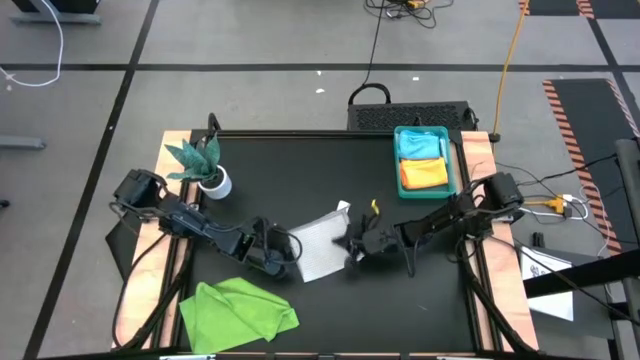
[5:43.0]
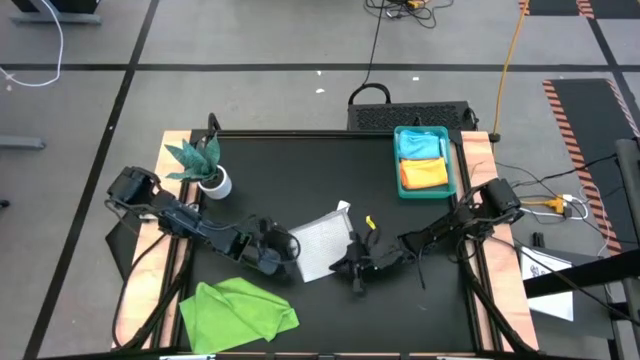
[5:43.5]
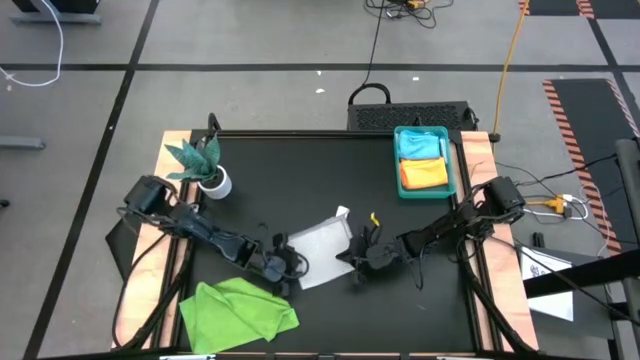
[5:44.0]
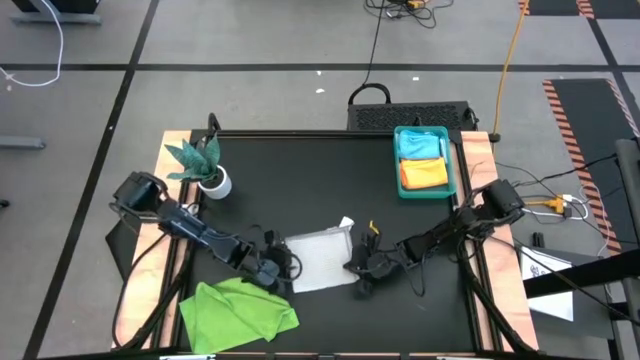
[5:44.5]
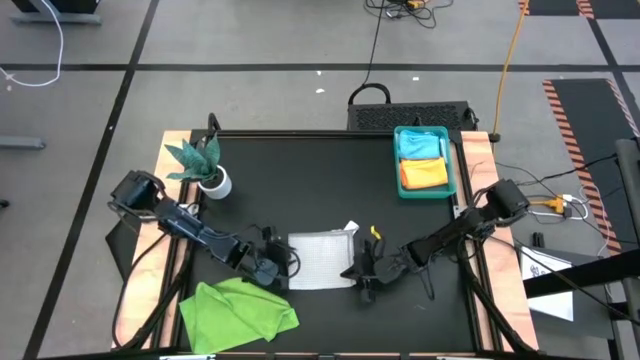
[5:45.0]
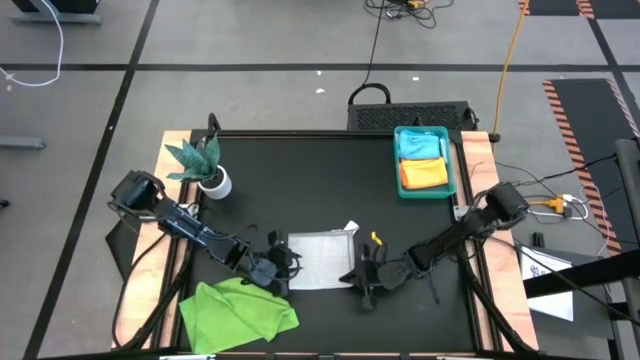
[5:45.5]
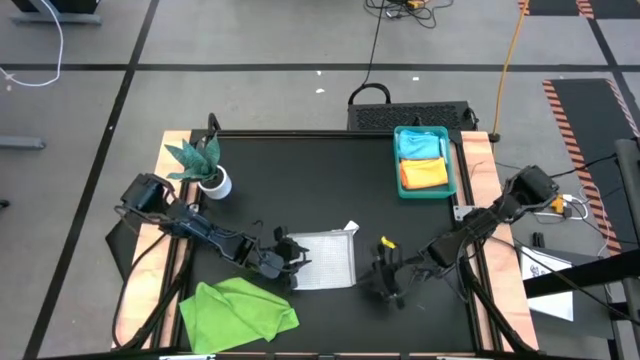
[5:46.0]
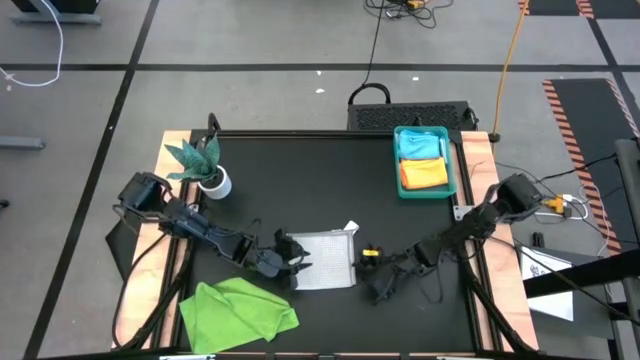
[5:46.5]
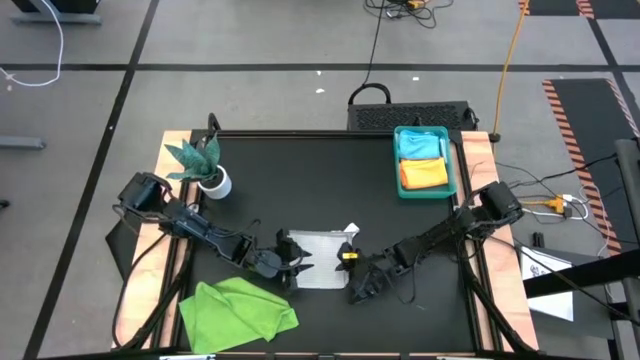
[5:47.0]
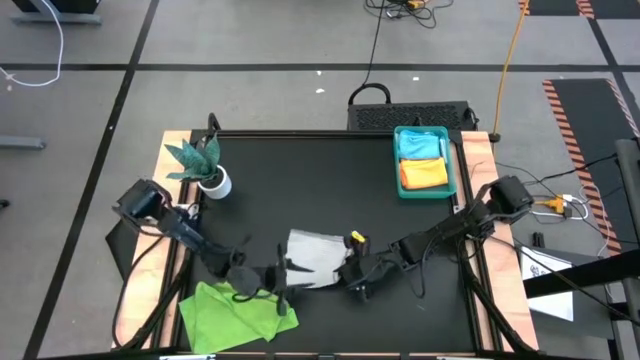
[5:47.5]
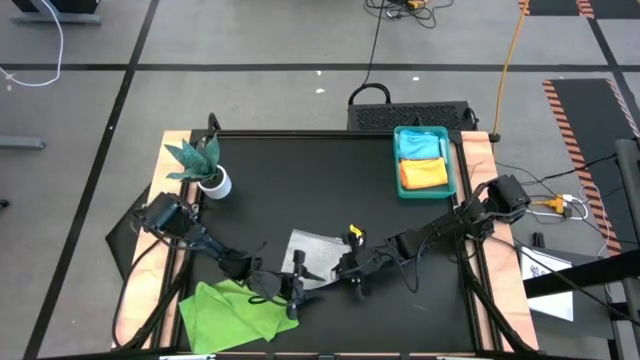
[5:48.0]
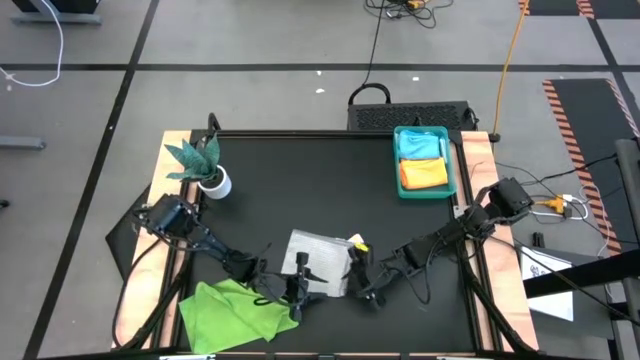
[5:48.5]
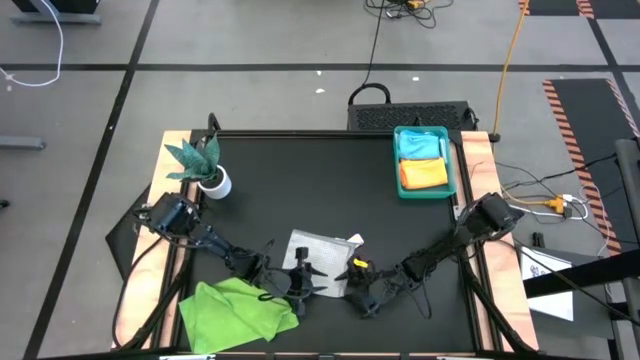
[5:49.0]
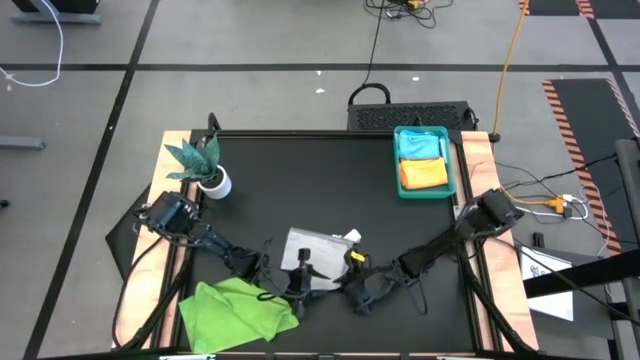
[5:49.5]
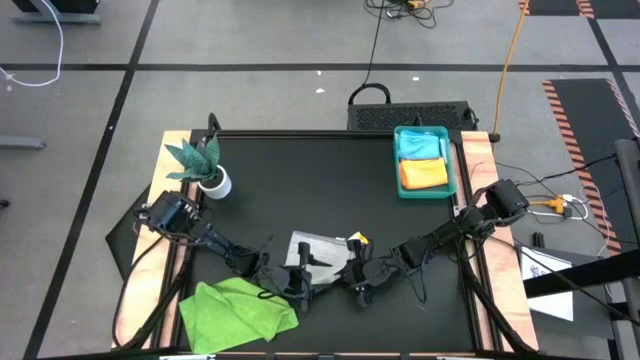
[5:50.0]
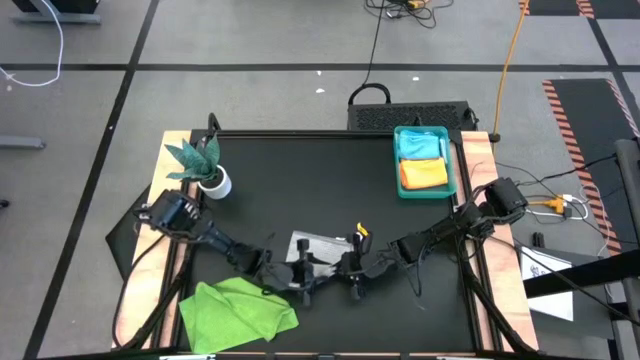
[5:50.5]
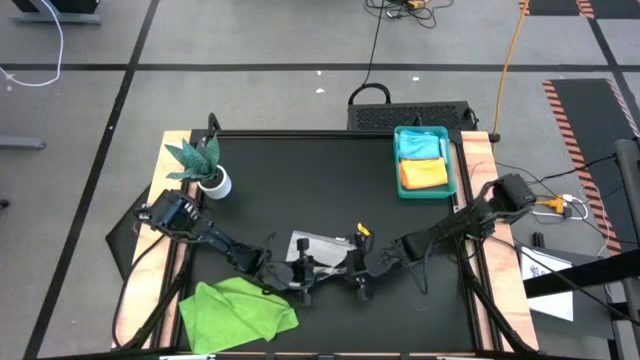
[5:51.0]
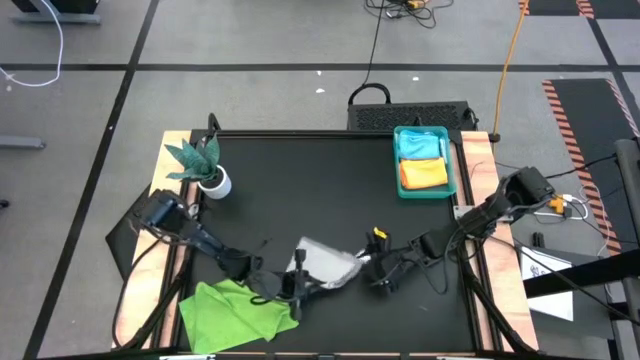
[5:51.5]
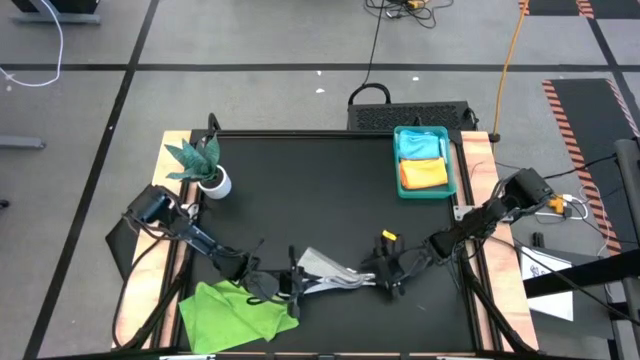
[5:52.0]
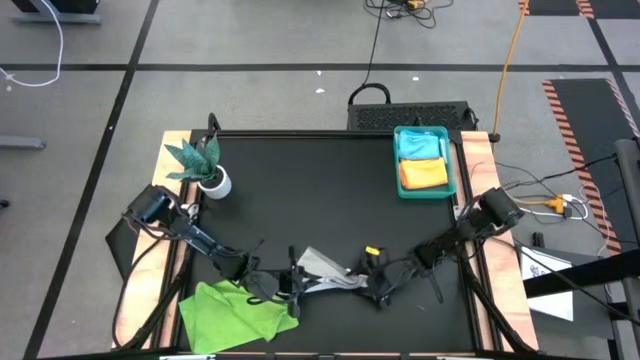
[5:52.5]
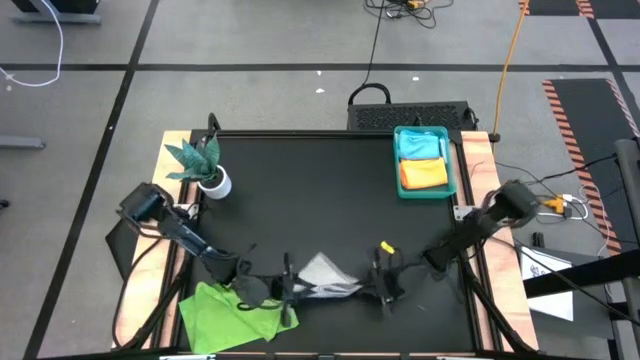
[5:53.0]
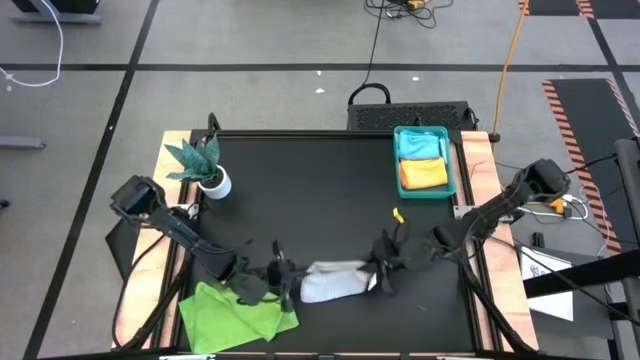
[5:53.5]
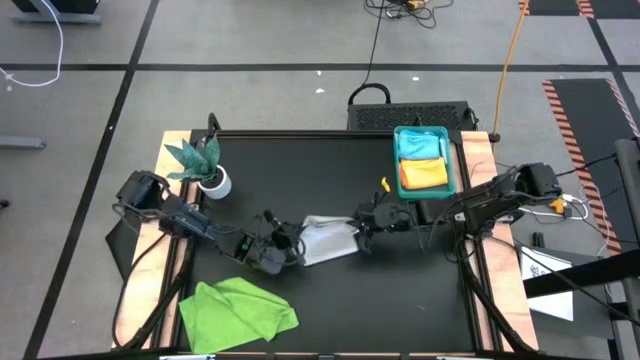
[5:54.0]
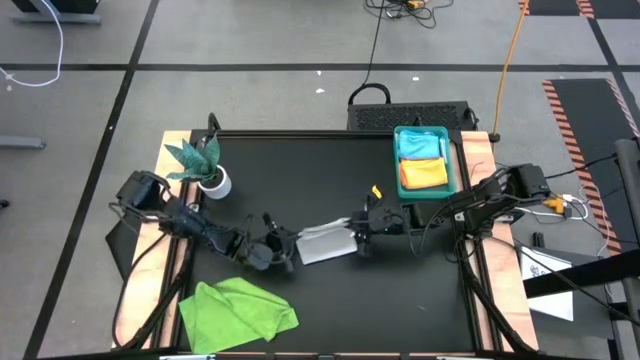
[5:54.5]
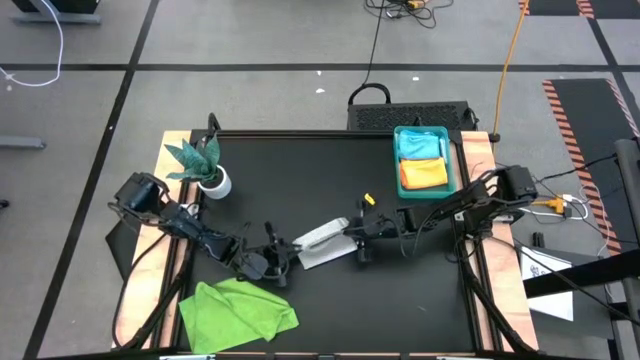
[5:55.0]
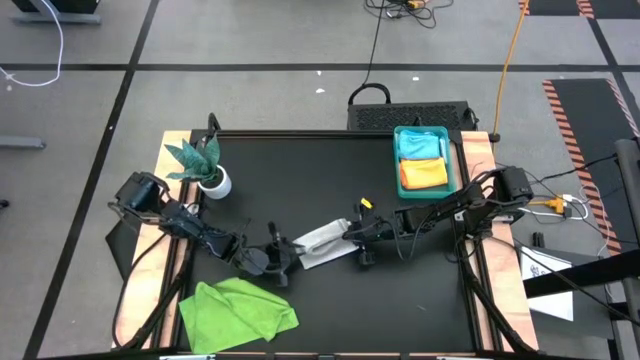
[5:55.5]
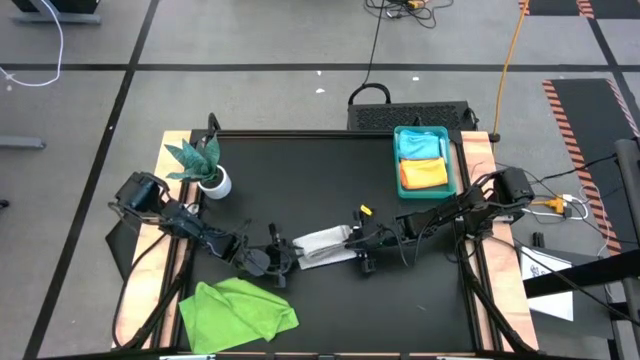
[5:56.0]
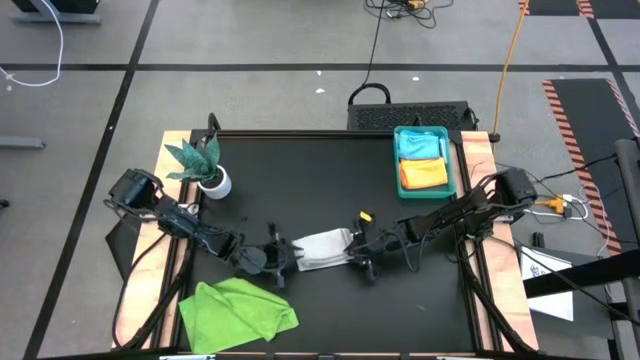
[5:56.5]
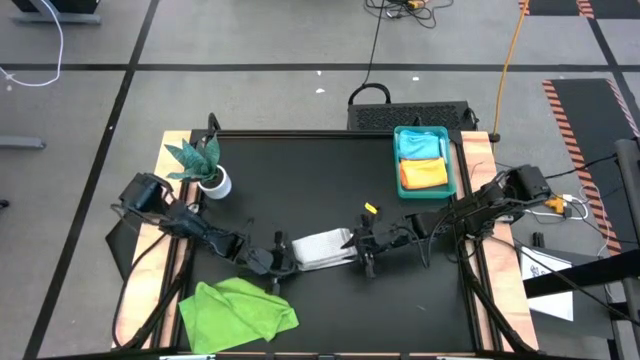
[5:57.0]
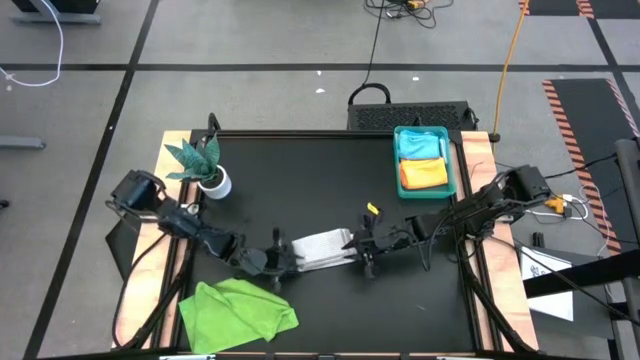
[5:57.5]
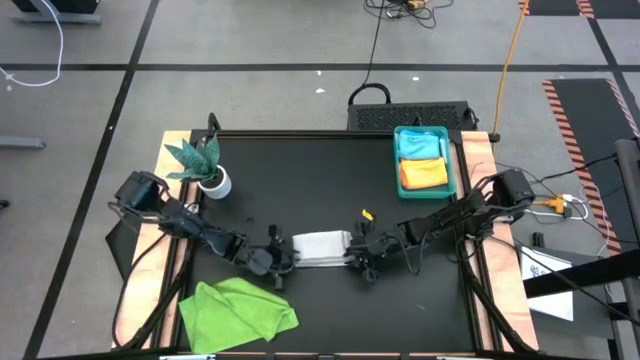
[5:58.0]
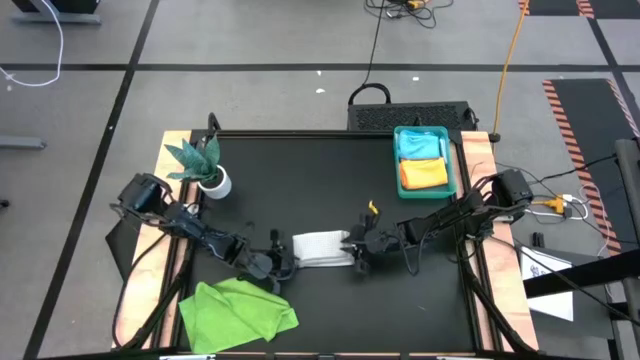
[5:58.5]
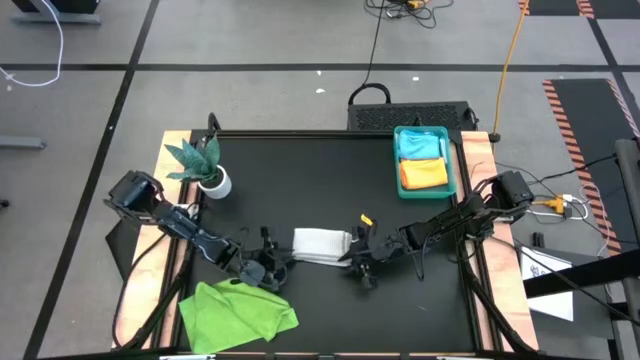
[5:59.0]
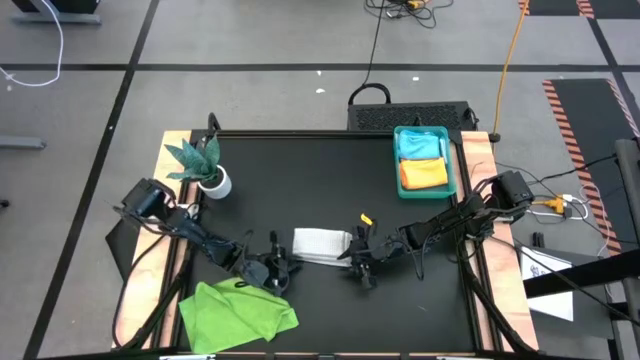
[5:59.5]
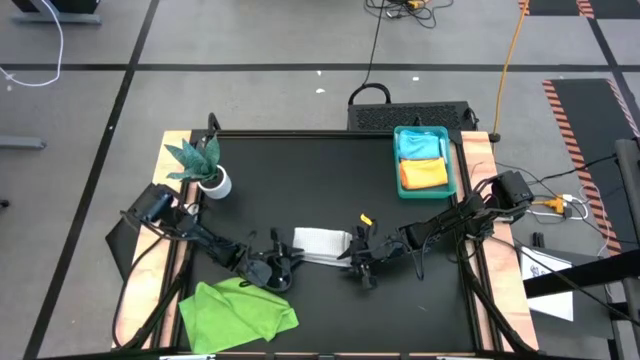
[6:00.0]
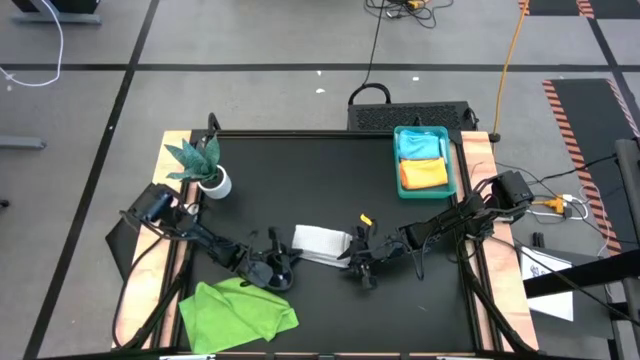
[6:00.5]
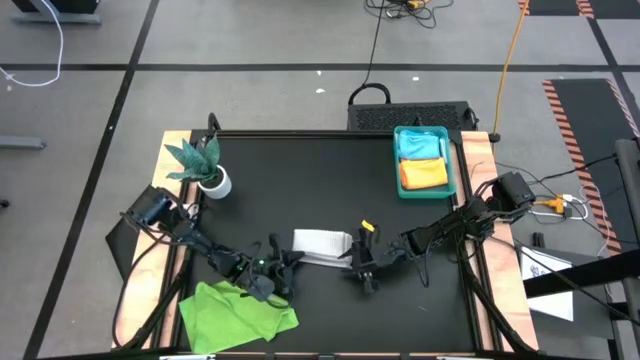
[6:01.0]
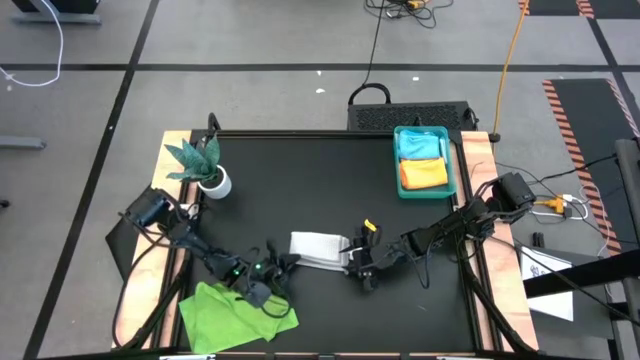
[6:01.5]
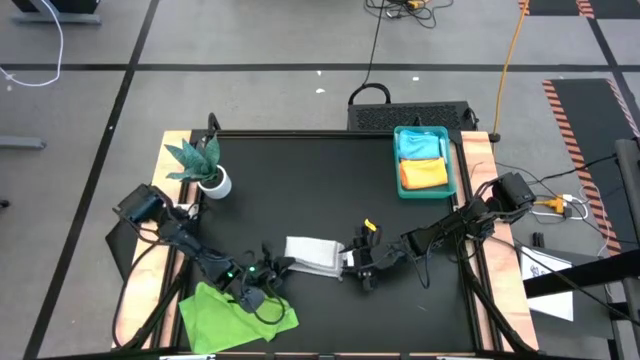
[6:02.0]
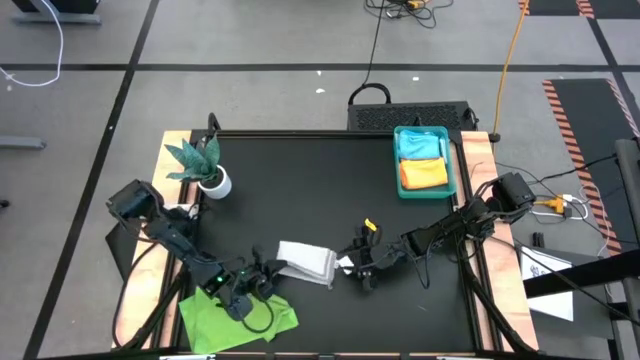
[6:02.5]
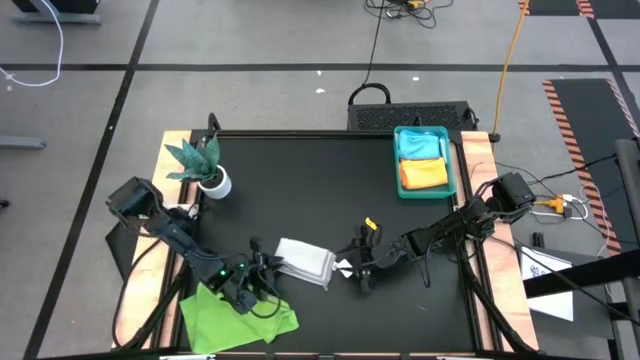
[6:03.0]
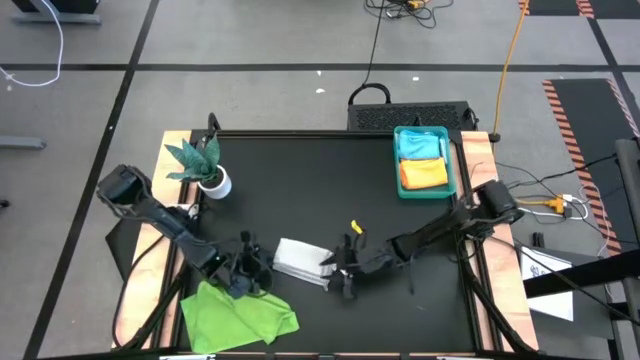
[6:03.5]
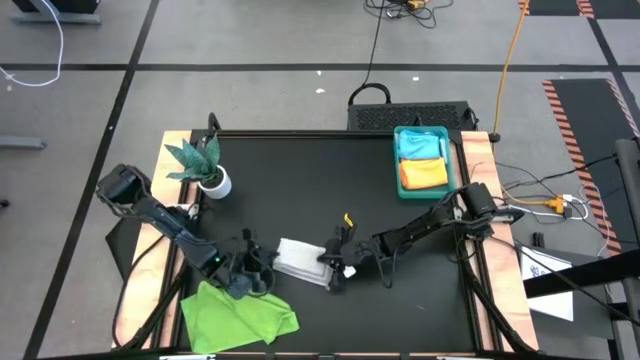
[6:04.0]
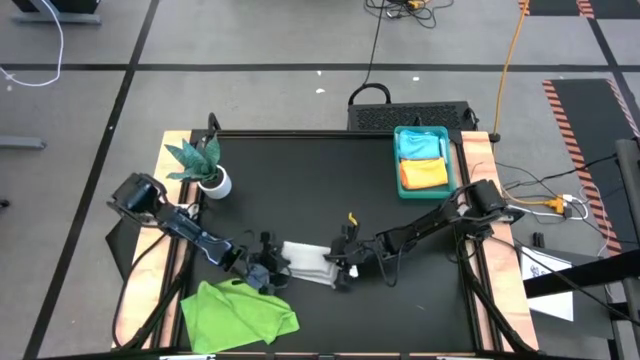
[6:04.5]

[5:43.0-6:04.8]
Task: Fold microfiber towels
Fold the white microfiber cloth
